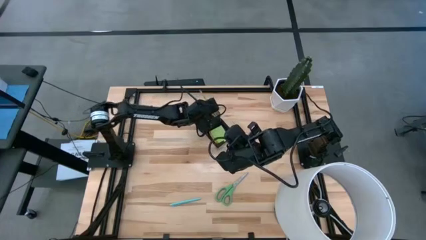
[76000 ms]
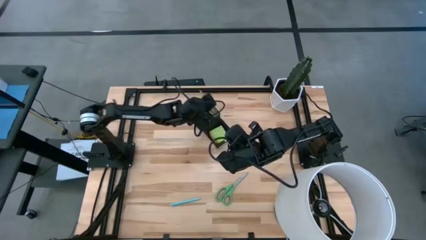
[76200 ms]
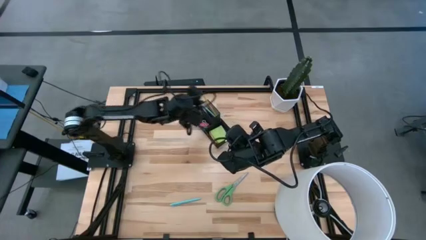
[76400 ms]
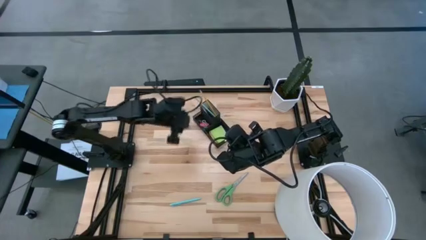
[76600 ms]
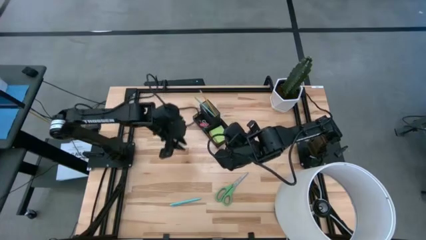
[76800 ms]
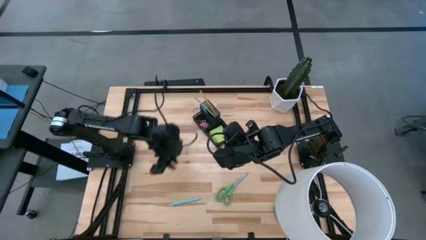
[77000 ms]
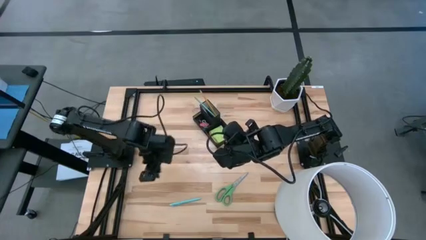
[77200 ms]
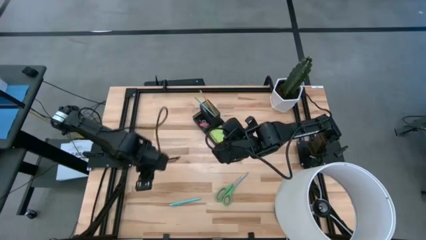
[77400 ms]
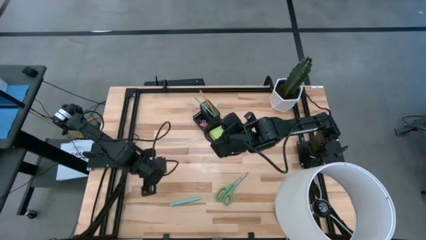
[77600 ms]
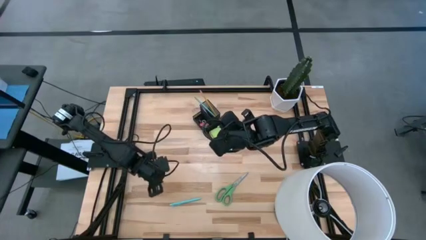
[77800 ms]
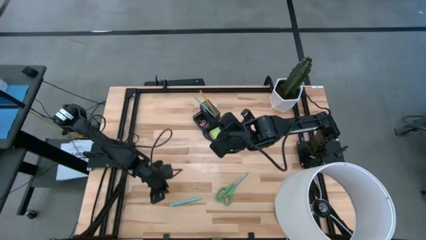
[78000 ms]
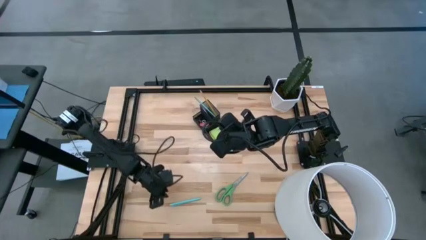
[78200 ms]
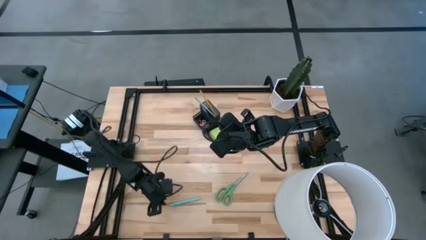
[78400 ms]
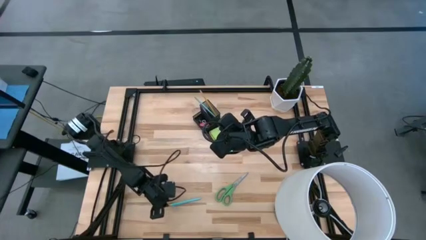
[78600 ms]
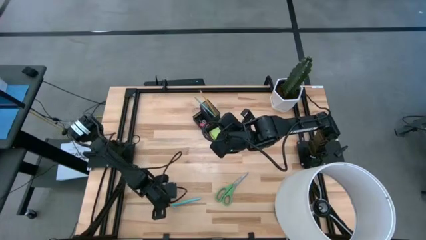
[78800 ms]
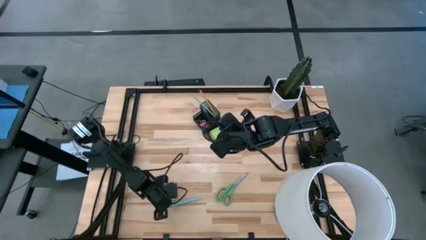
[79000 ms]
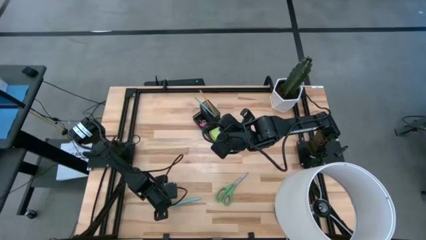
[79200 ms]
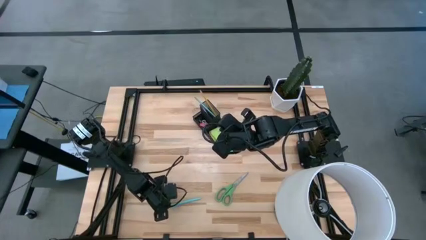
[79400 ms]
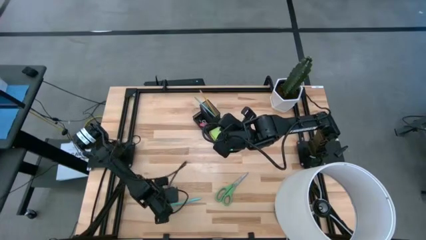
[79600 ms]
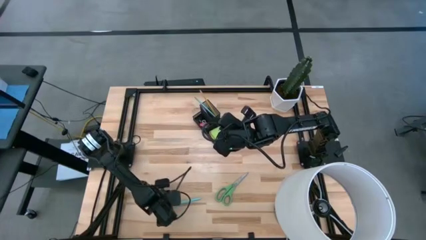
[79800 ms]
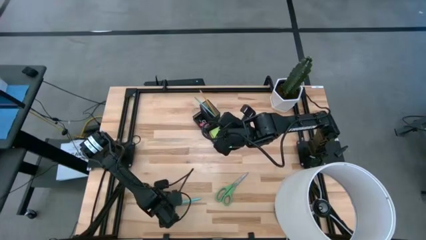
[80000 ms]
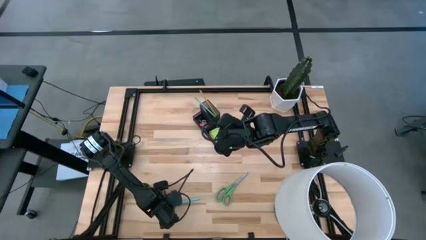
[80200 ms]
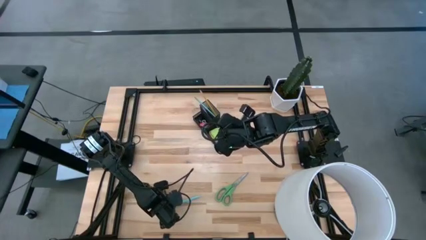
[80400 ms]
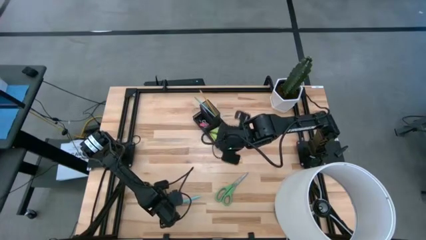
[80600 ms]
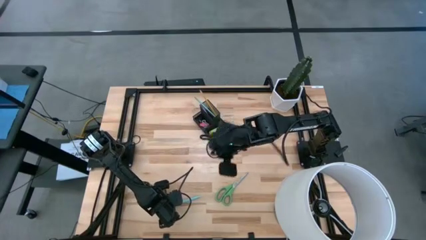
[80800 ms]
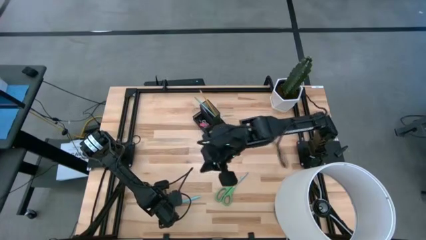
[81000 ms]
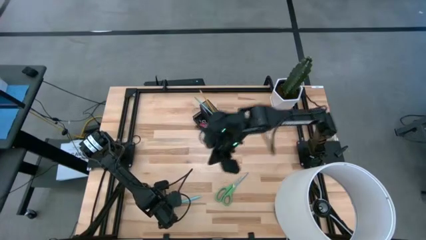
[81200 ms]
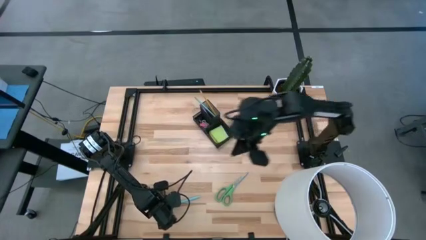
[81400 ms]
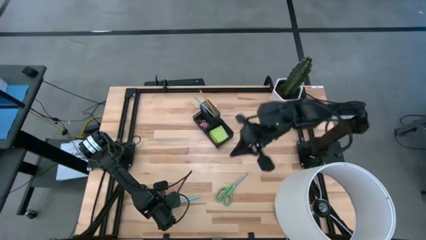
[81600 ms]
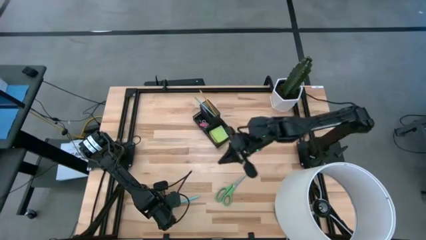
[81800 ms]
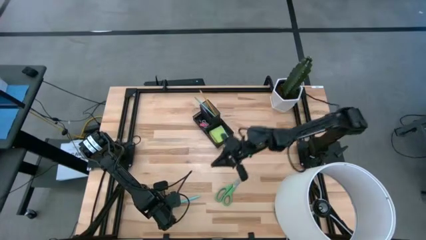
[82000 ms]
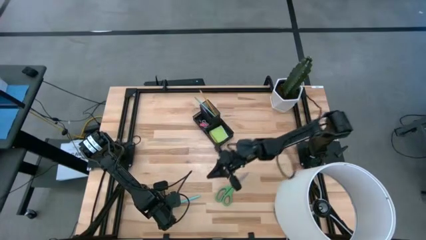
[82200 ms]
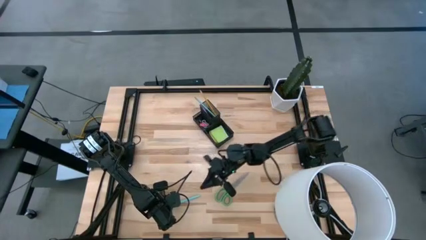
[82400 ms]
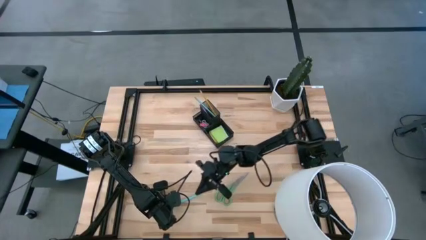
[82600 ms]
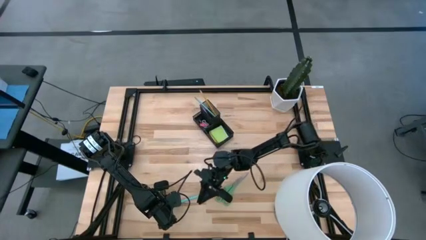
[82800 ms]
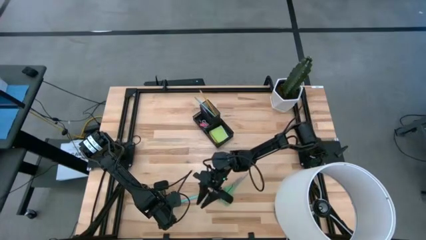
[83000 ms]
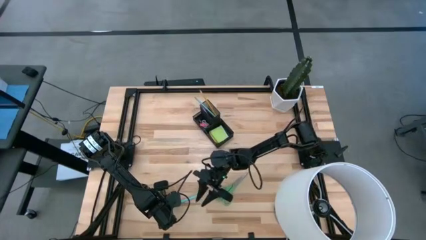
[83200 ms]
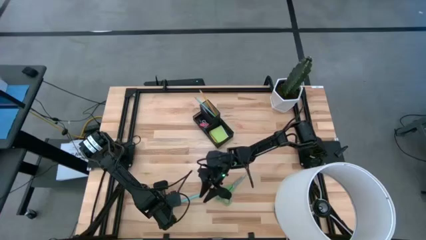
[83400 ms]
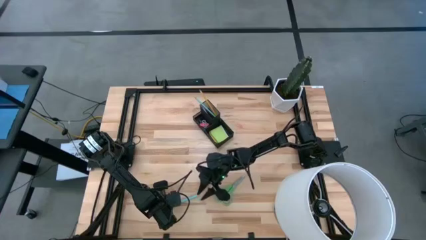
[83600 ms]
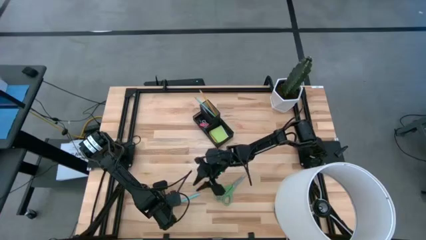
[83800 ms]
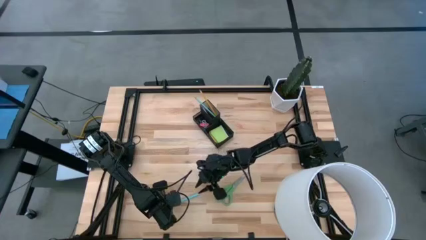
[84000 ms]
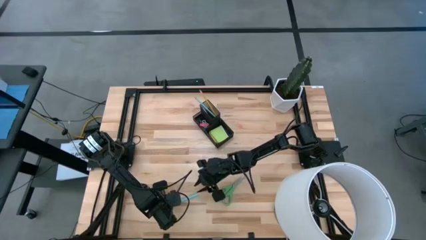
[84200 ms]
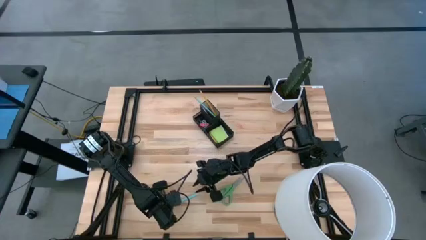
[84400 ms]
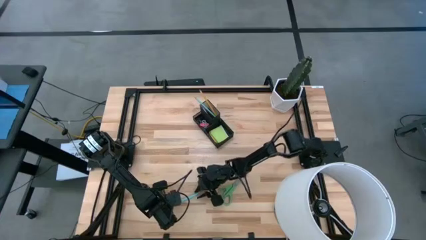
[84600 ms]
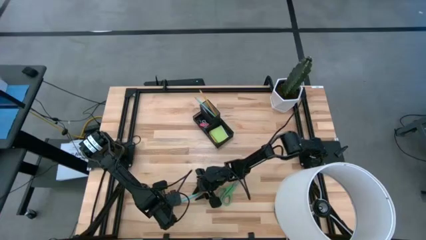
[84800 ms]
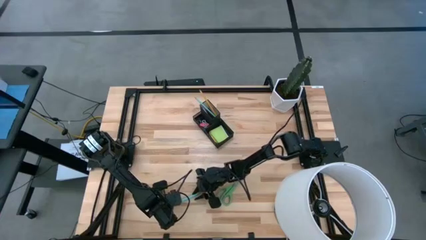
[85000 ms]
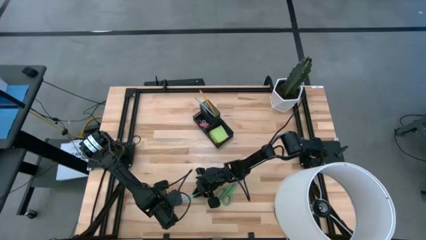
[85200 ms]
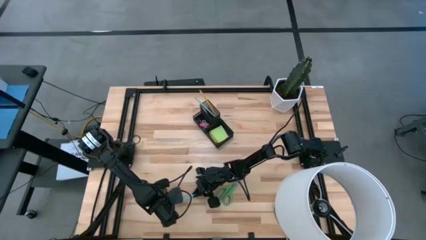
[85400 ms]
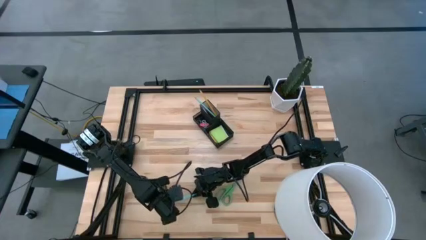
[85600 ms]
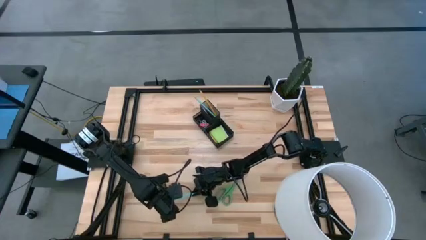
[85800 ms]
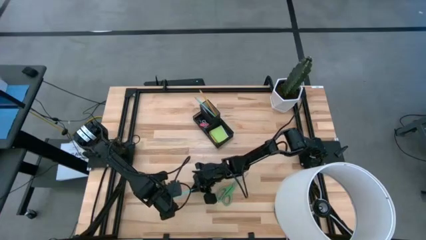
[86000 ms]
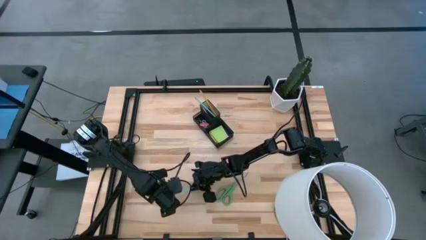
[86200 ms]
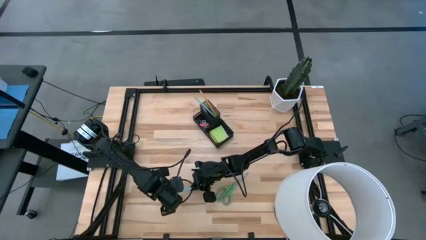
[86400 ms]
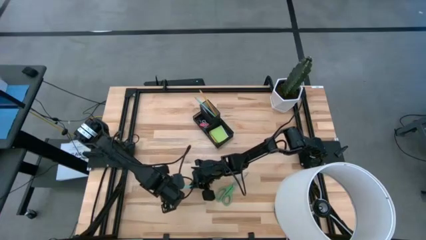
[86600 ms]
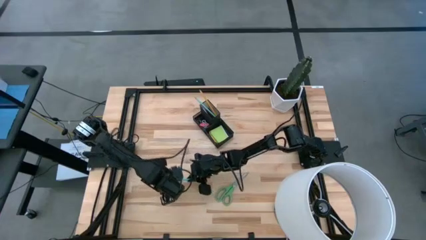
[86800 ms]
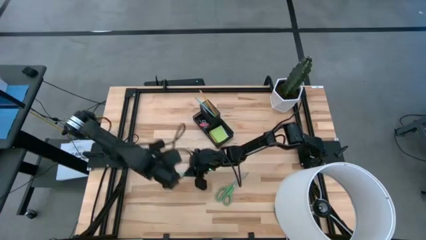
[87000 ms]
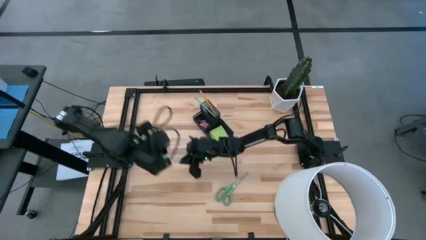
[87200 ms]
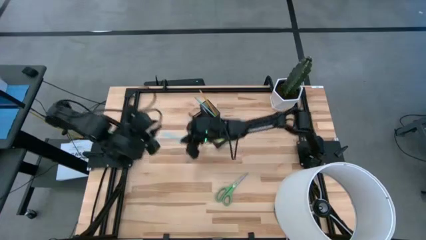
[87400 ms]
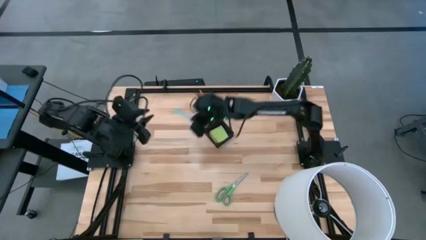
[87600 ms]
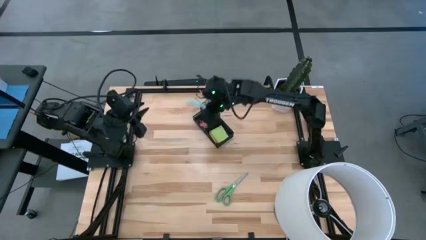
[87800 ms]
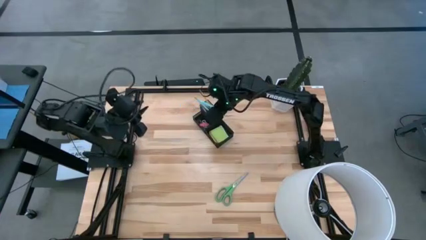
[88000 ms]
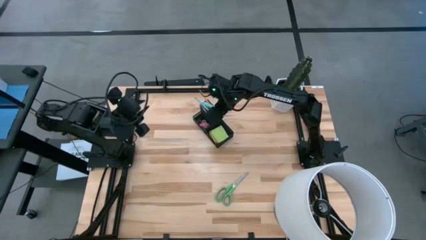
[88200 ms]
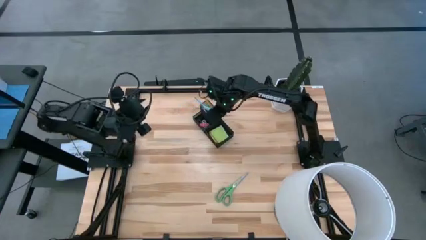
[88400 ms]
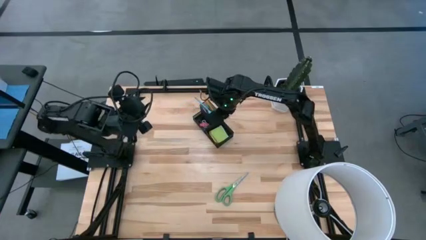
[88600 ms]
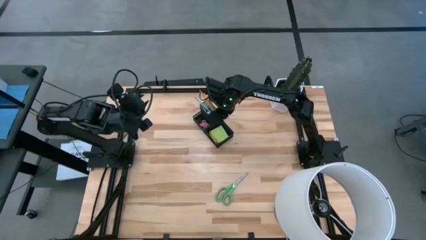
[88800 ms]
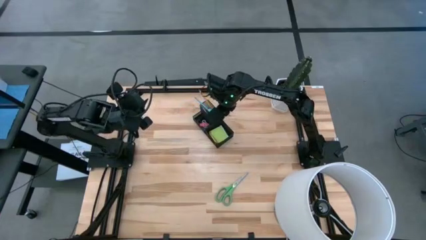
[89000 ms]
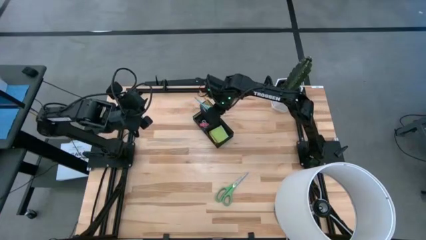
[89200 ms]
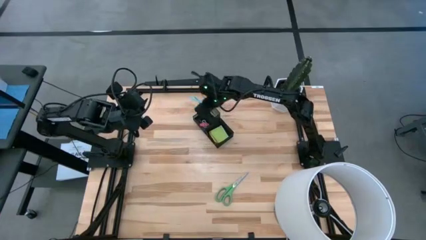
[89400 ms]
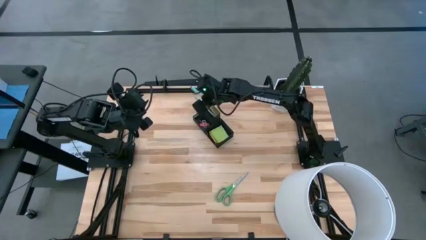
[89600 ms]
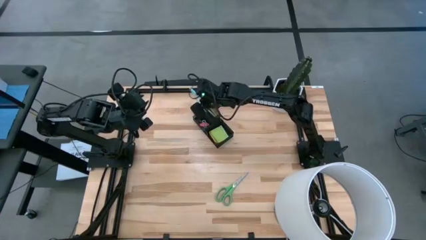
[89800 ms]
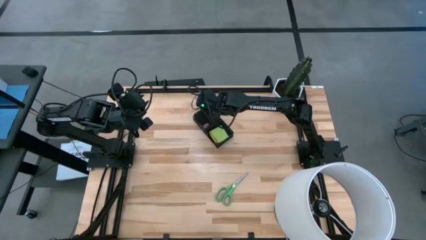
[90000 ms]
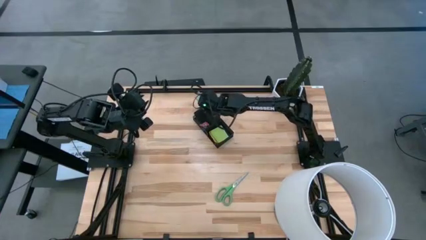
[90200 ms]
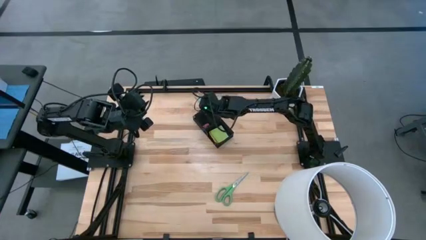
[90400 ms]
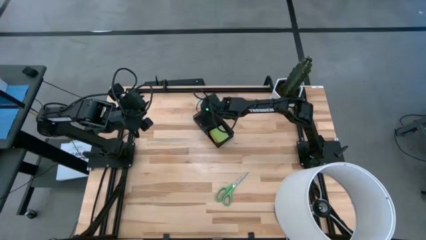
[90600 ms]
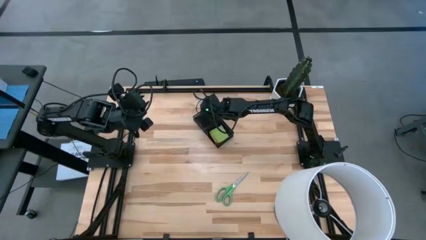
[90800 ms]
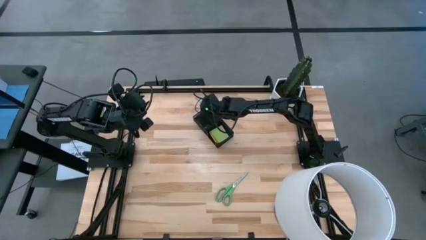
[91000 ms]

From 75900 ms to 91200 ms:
Task: Pick and place office supplies into organizer
Put the blue pen into the black desk organizer
